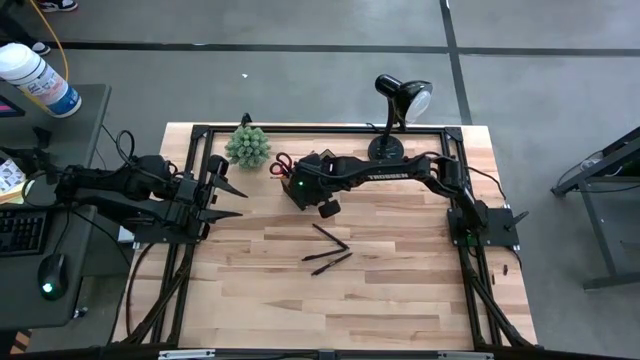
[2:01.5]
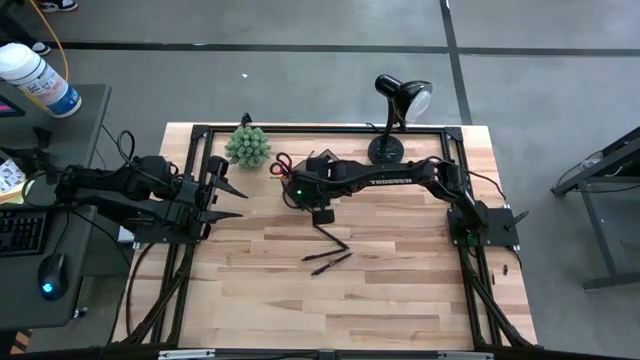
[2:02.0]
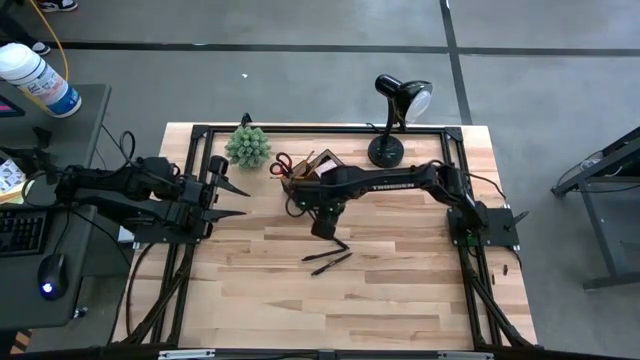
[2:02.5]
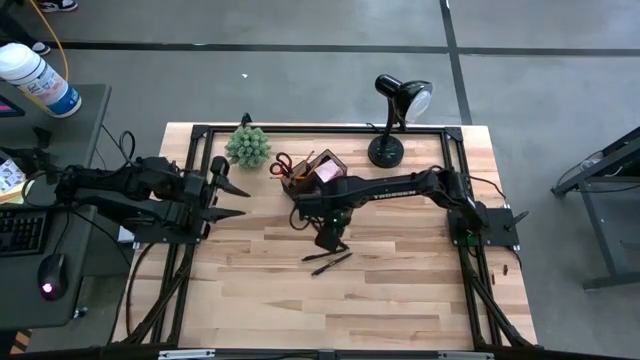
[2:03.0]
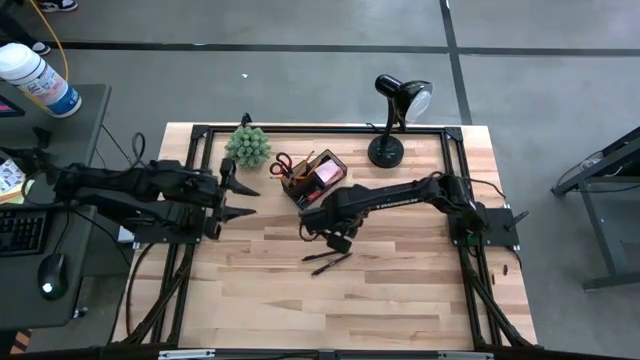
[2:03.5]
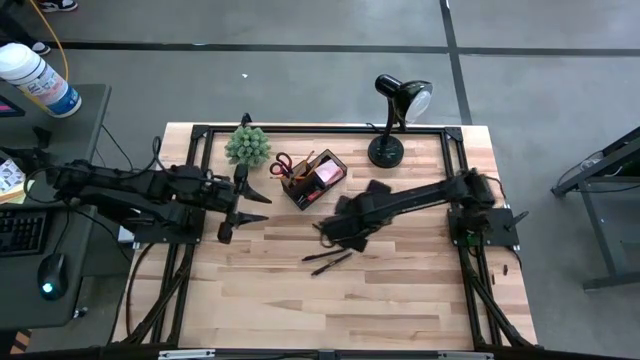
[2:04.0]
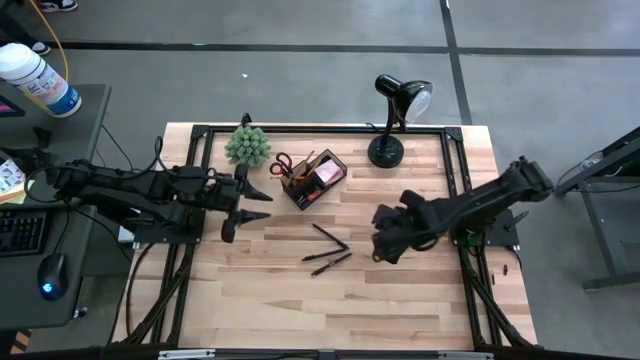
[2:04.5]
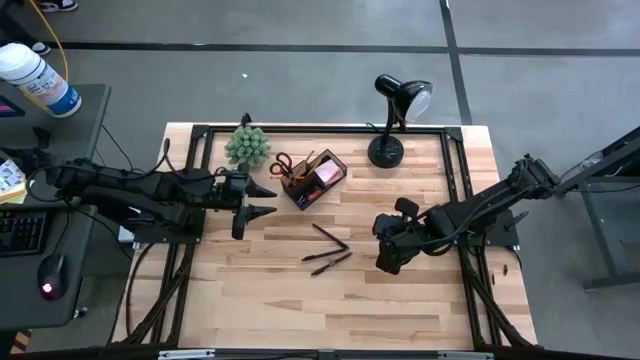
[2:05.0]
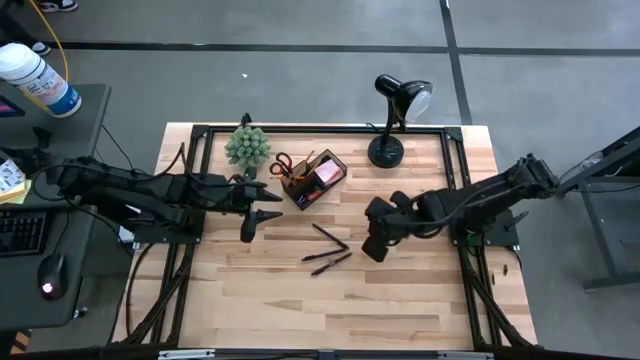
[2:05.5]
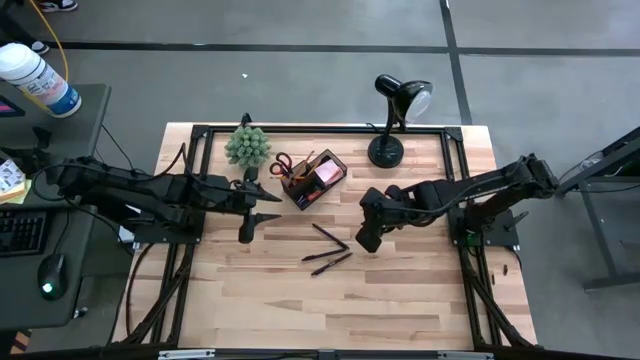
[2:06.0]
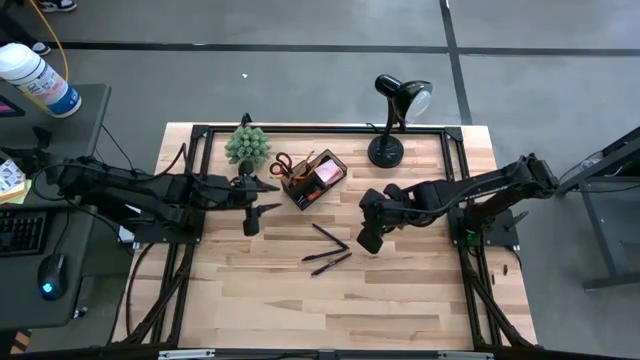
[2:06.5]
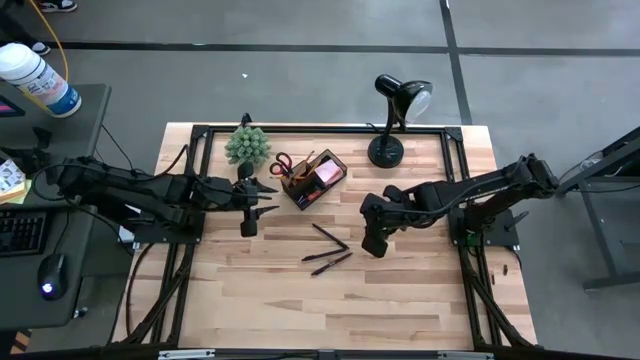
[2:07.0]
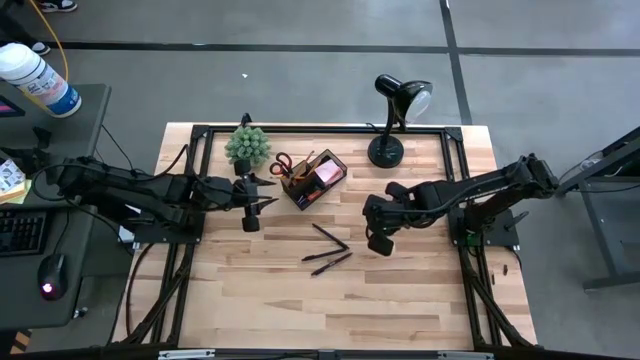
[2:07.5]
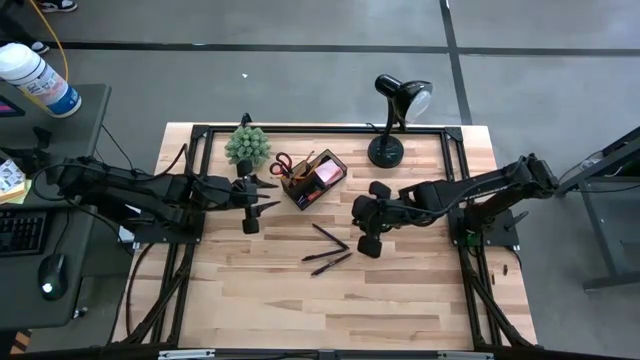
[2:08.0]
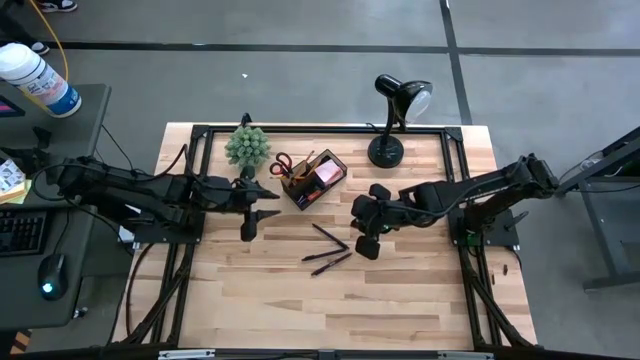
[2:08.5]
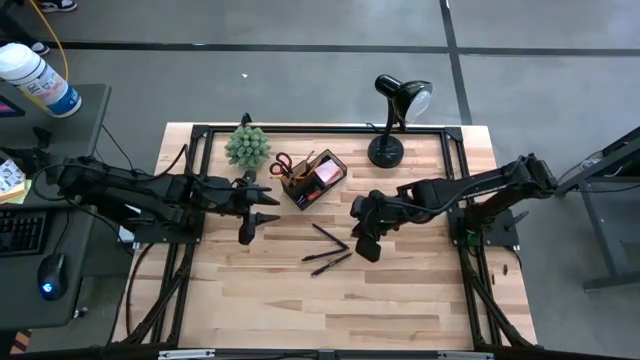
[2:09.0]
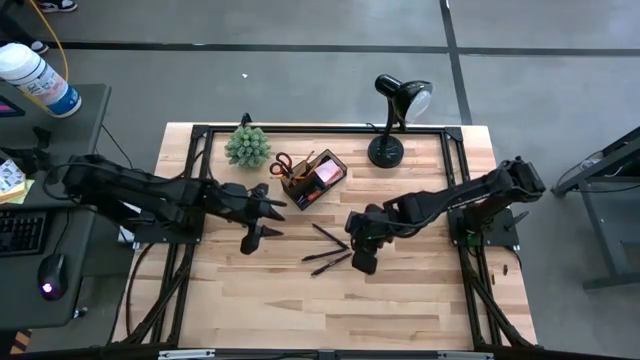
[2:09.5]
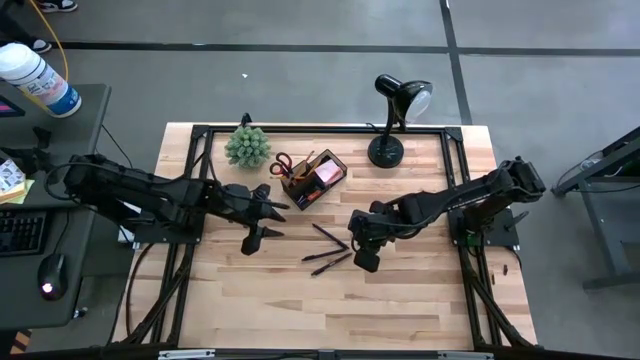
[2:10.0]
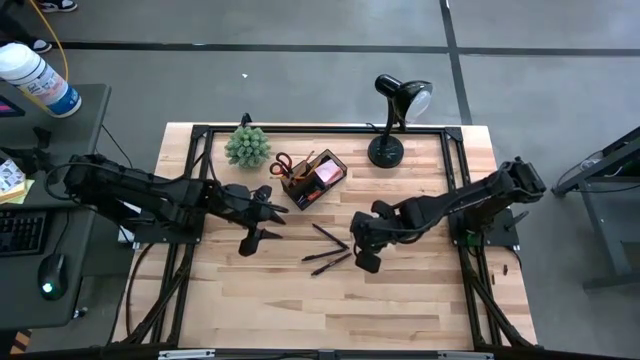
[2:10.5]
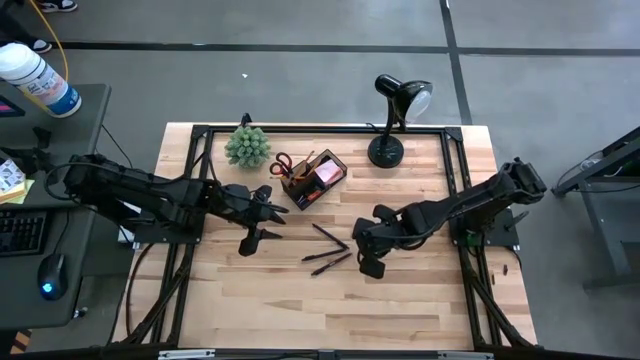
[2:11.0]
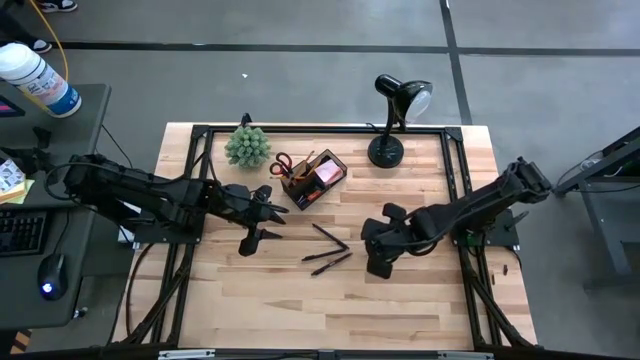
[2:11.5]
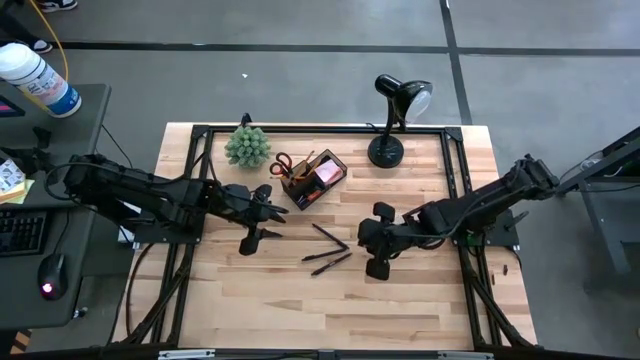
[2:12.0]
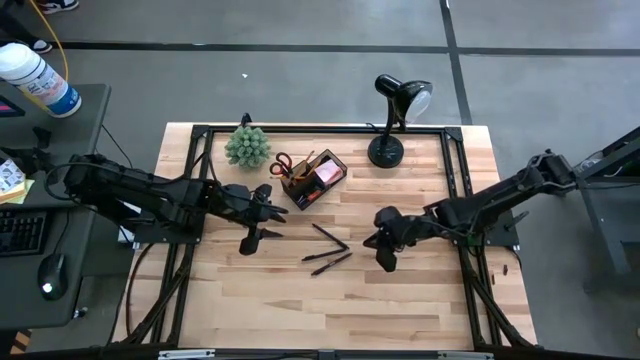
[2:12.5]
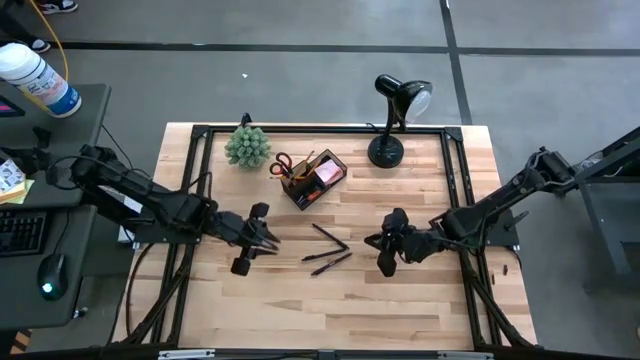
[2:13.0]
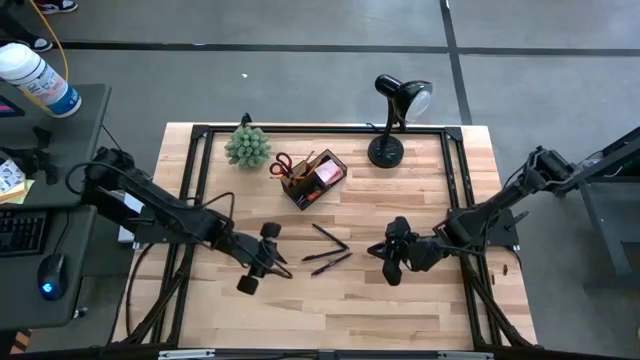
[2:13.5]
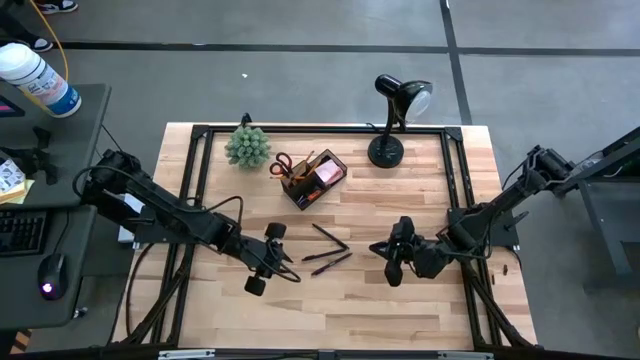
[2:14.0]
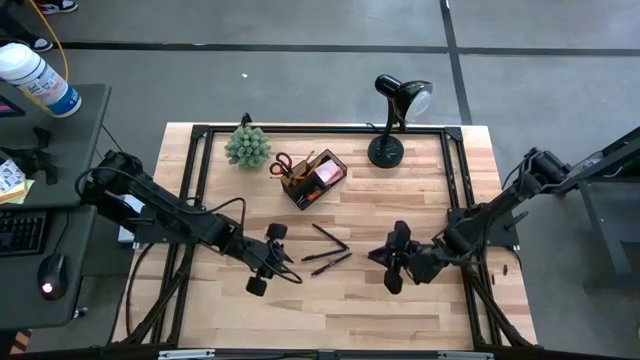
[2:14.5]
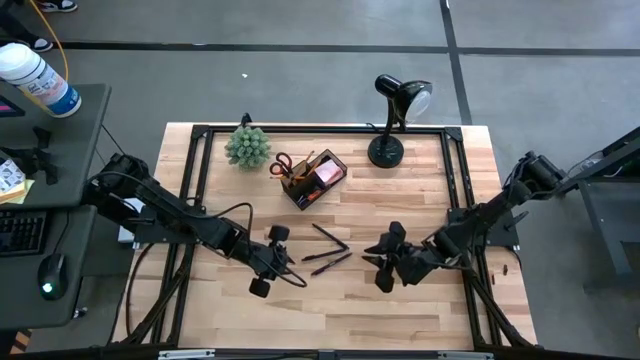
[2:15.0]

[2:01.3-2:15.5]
Task: Pick and place office supplies into organizer
Put the bottom black pen into the black desk organizer

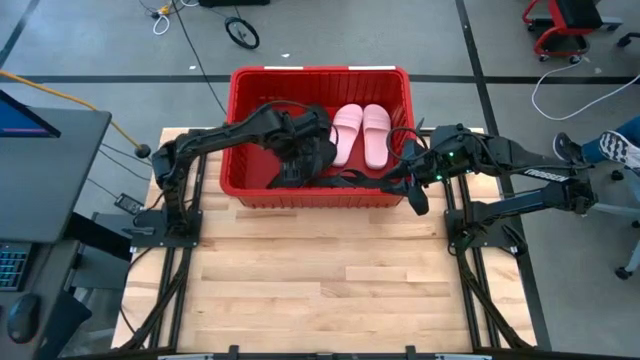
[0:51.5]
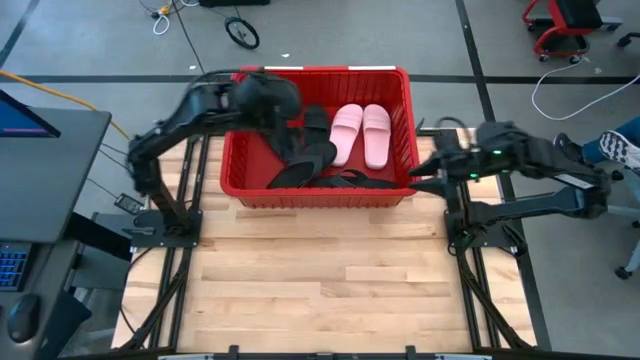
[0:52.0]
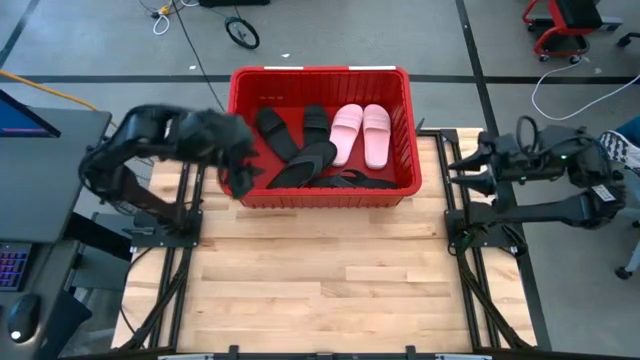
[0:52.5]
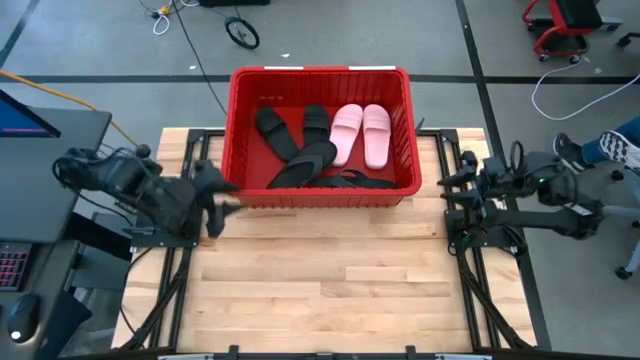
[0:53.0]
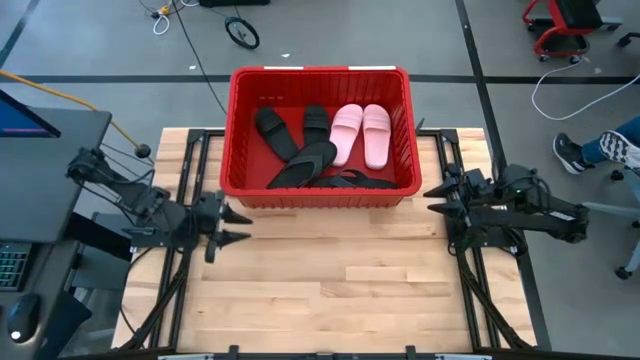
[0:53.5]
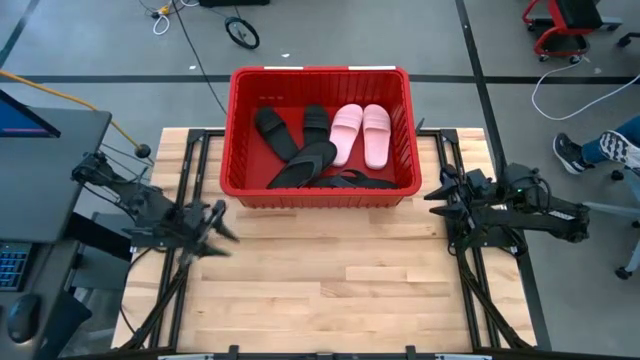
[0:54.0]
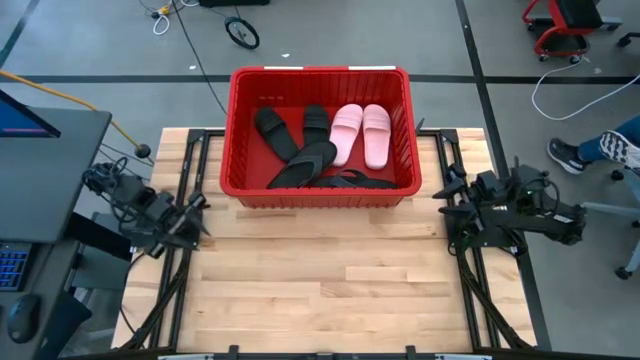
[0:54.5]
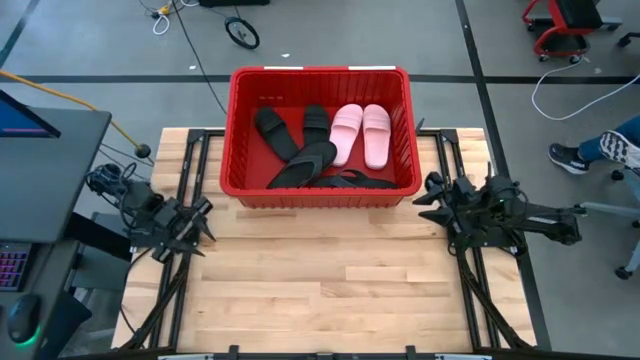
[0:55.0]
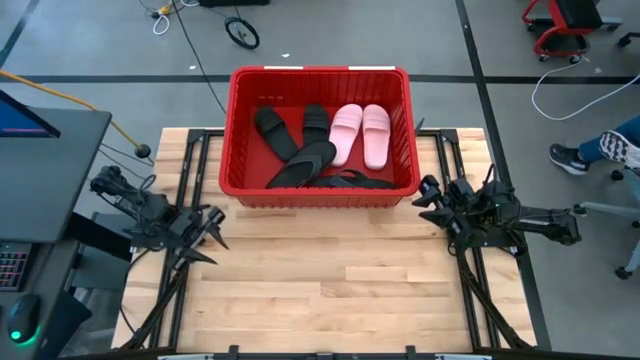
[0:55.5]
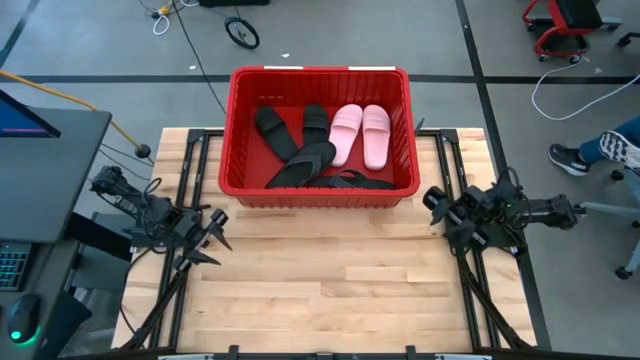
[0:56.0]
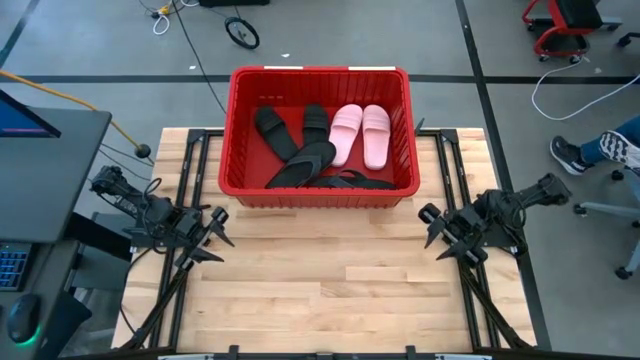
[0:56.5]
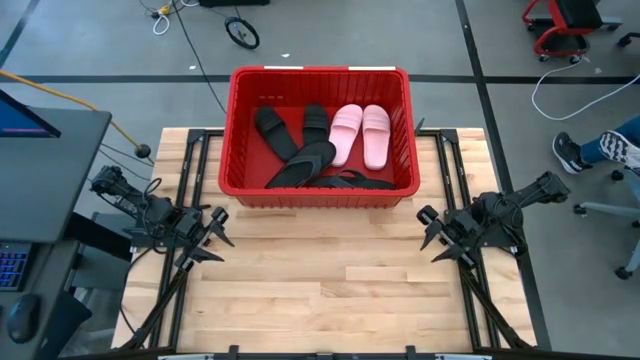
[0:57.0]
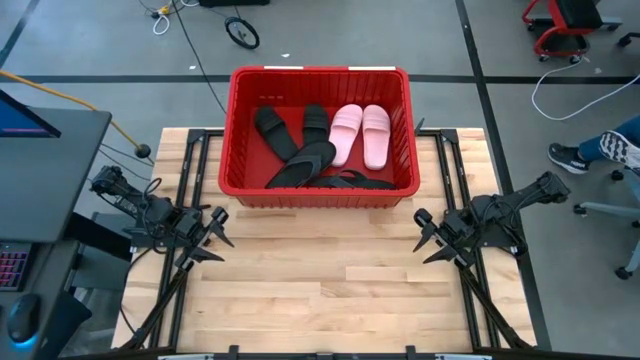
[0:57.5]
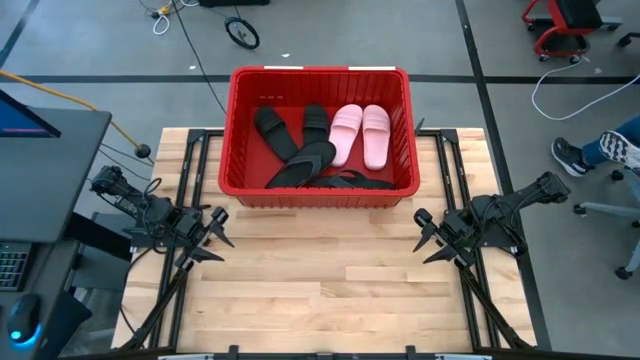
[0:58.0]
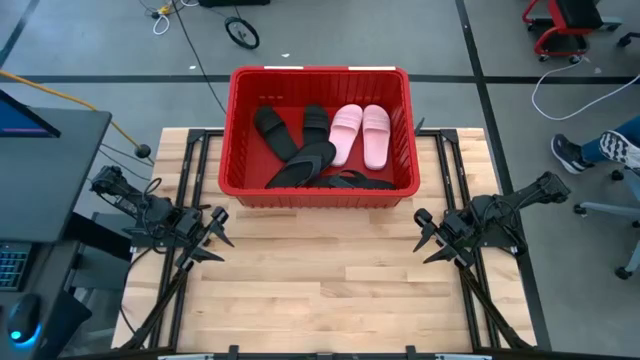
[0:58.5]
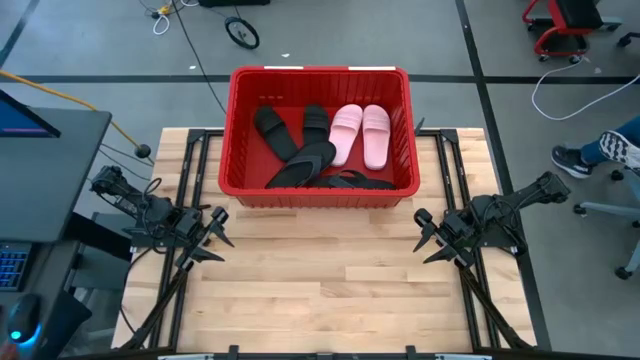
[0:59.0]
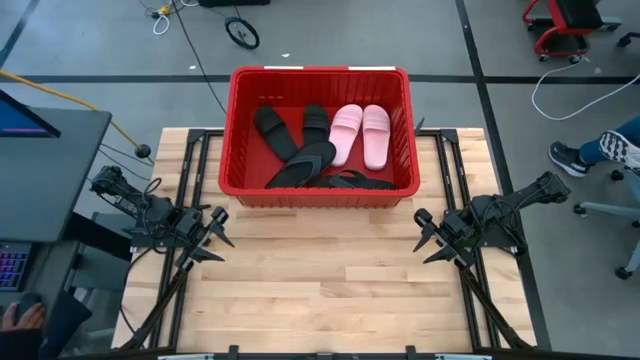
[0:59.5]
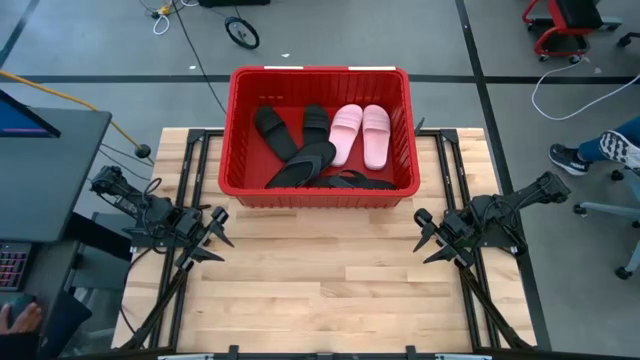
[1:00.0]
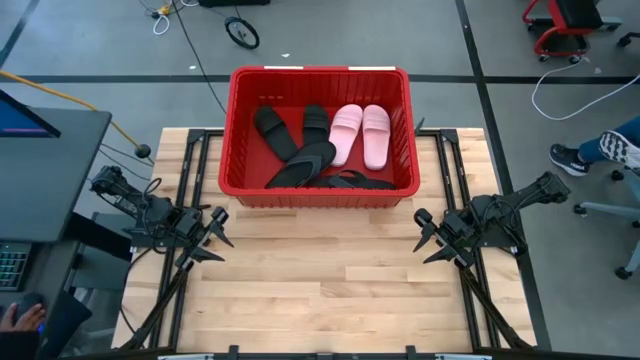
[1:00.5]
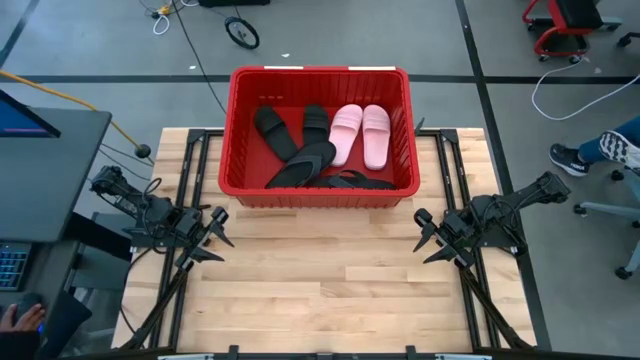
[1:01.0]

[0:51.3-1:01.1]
Task: Pick and place slides into bin
Return to Home Position
